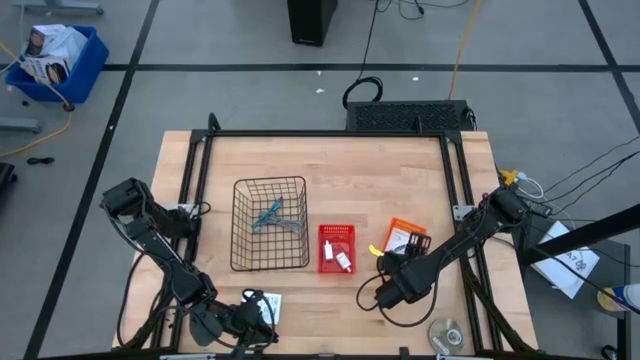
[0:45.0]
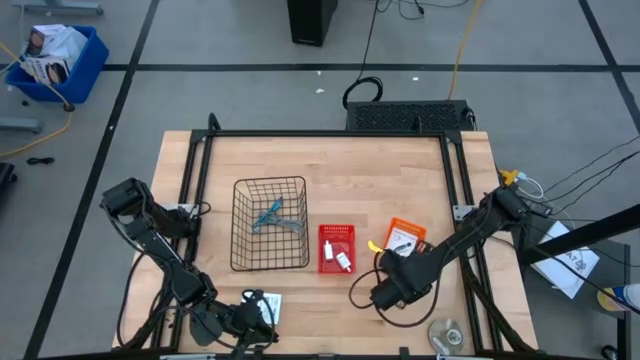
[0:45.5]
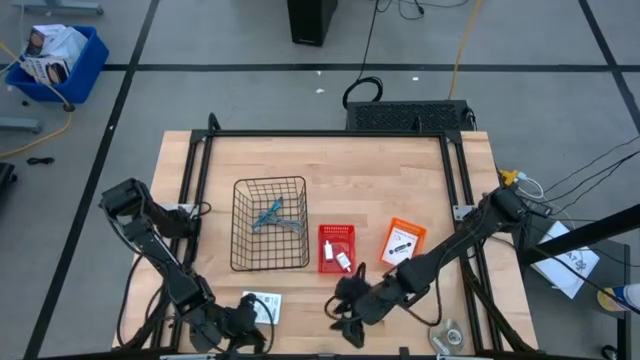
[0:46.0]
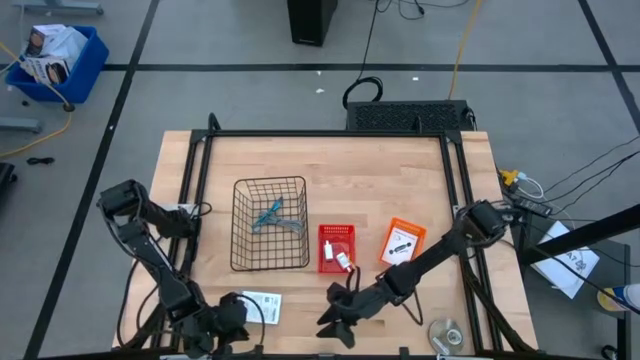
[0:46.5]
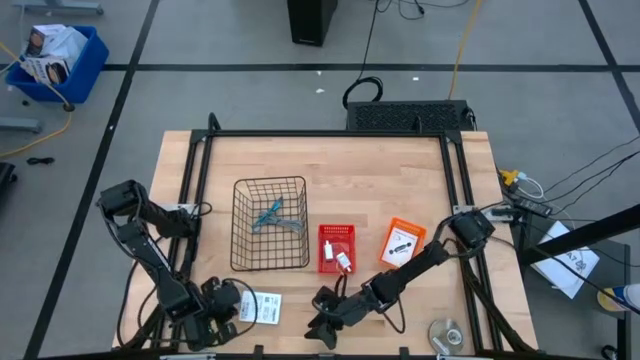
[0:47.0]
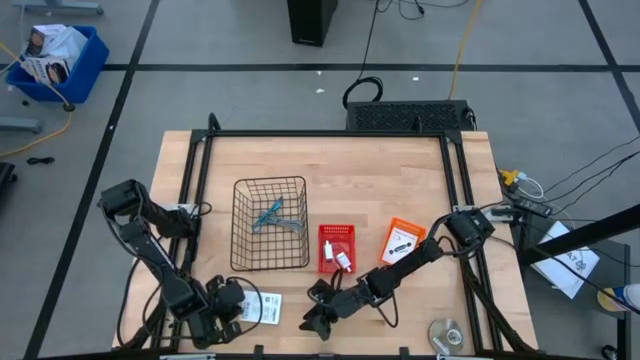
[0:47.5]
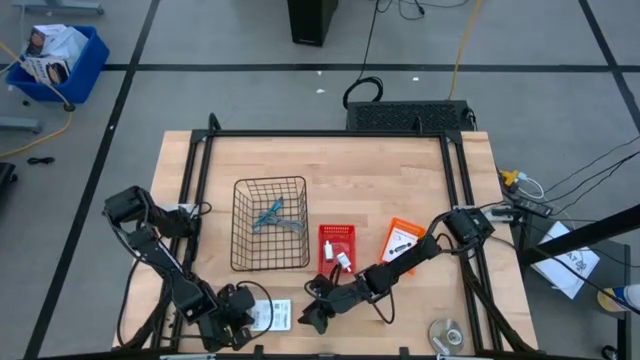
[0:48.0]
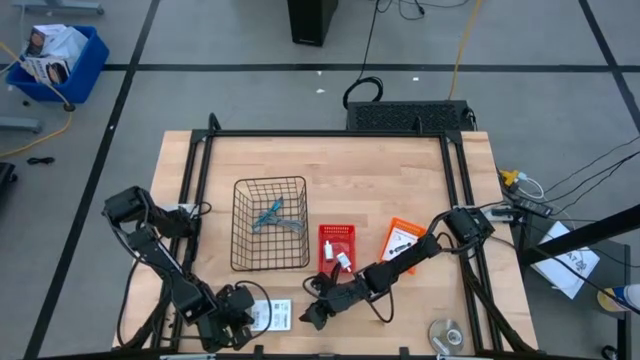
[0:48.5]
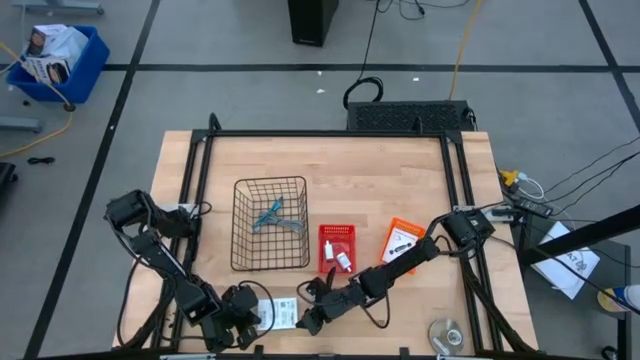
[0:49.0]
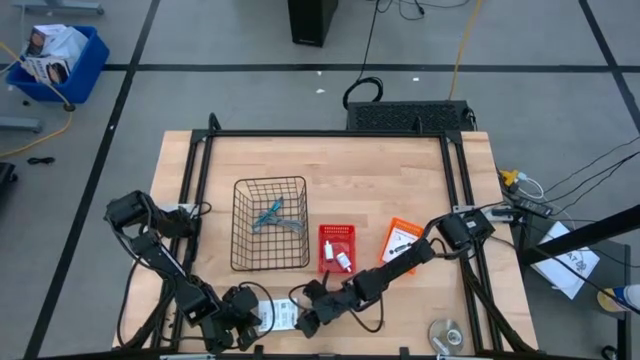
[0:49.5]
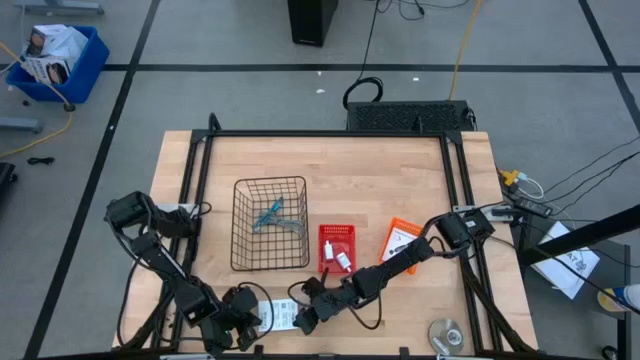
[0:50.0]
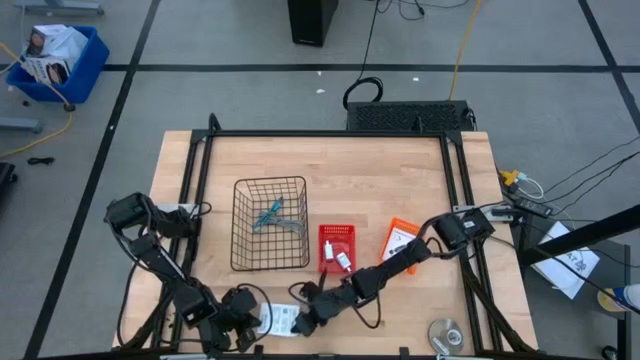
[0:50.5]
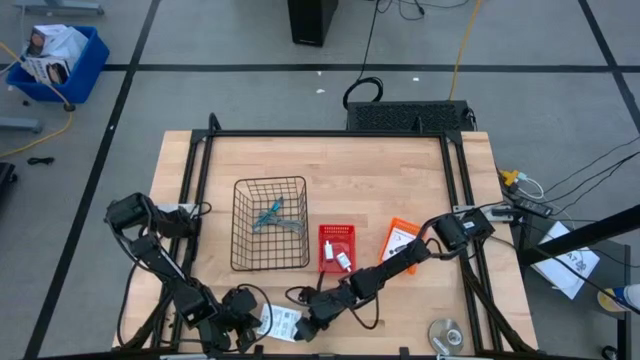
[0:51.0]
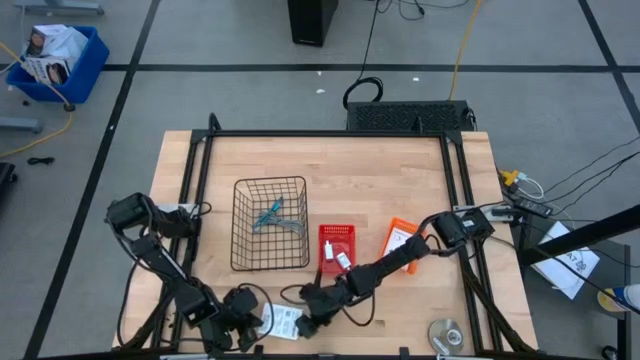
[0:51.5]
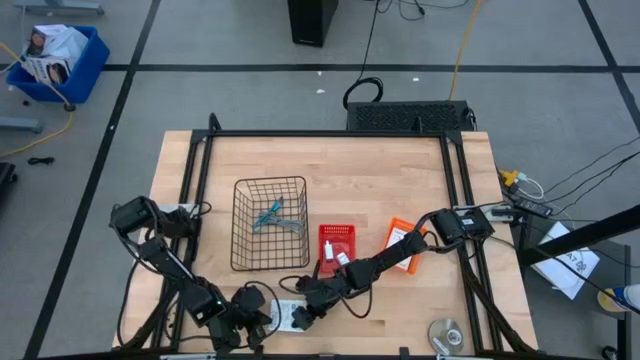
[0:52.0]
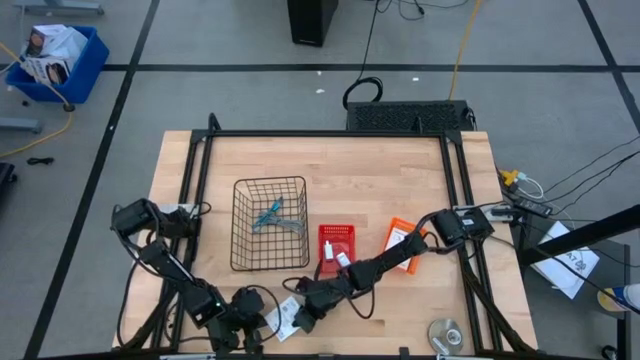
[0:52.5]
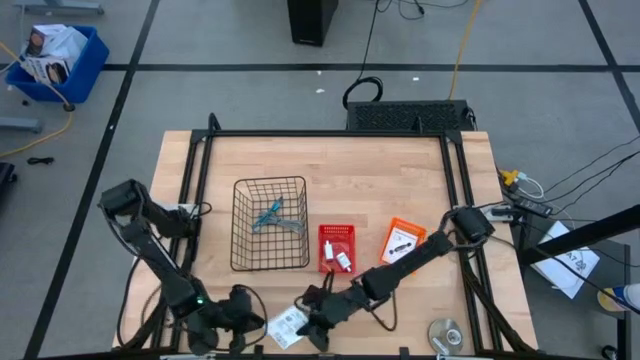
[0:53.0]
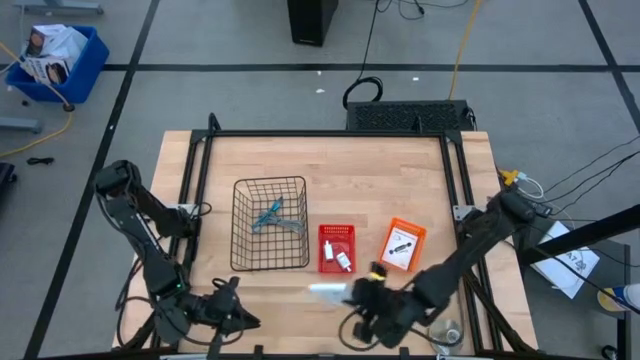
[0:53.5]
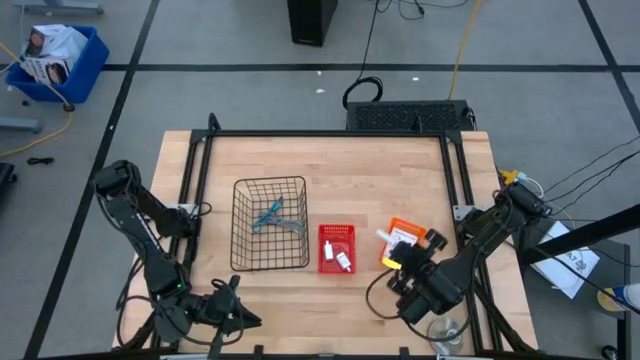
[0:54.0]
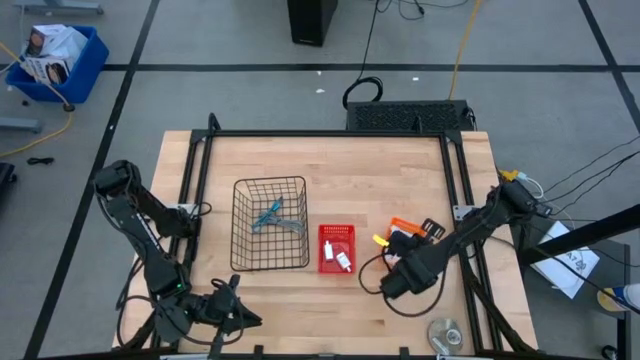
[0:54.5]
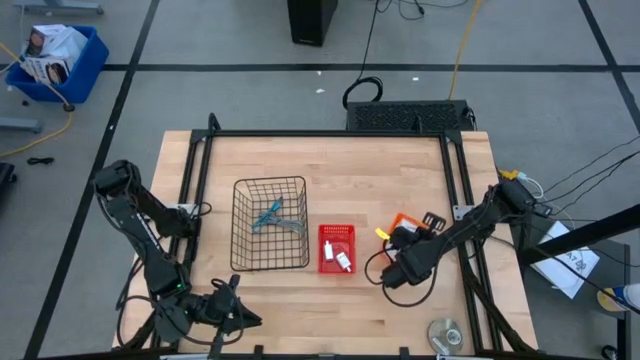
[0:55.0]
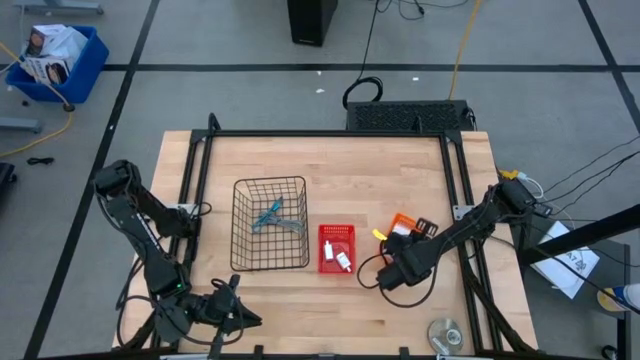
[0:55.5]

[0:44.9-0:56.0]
Task: Pick and place items into bin
Put the white card reader box into the orange bin

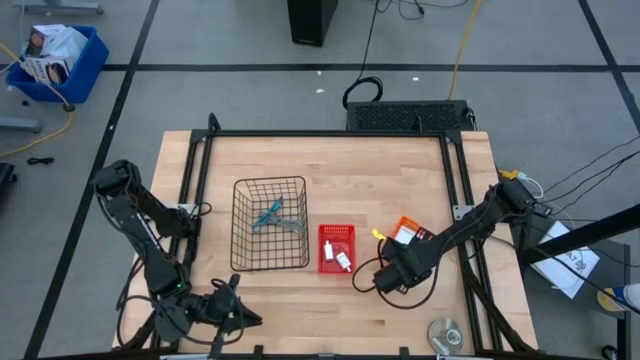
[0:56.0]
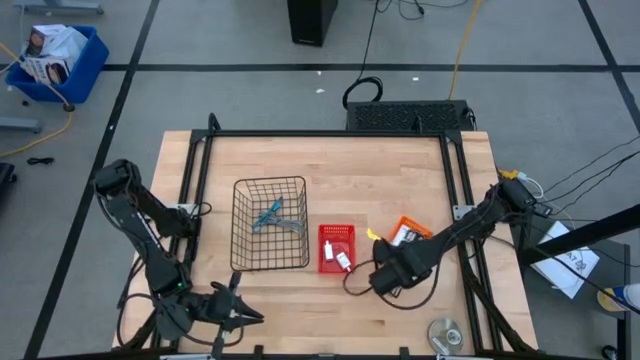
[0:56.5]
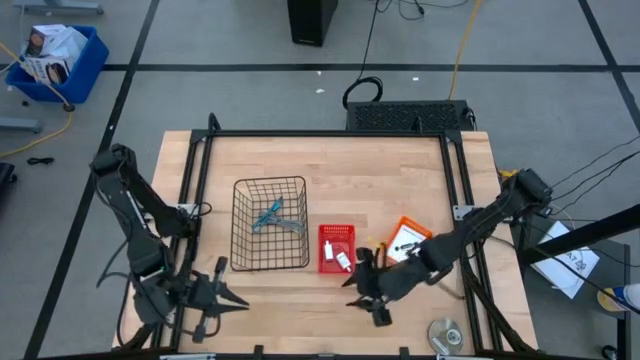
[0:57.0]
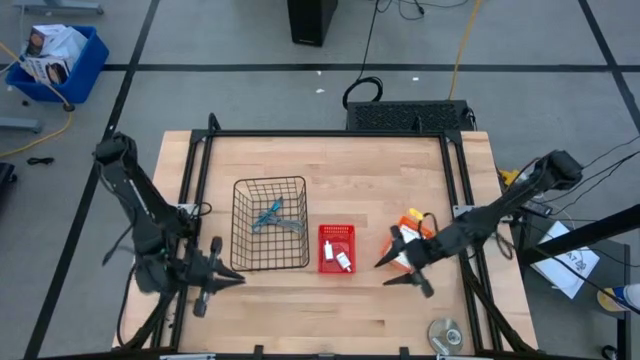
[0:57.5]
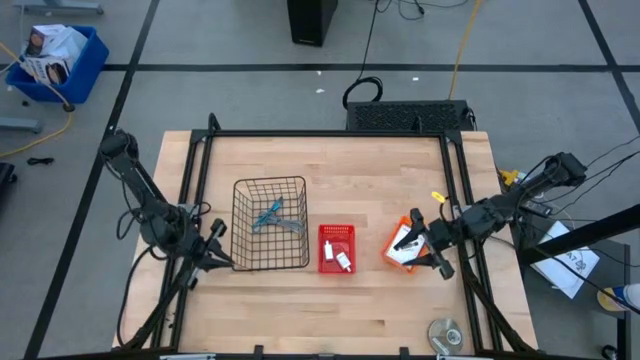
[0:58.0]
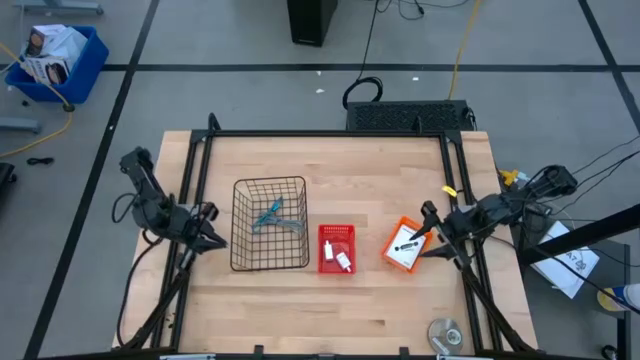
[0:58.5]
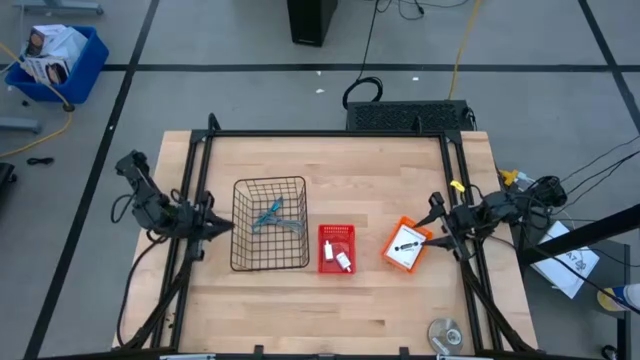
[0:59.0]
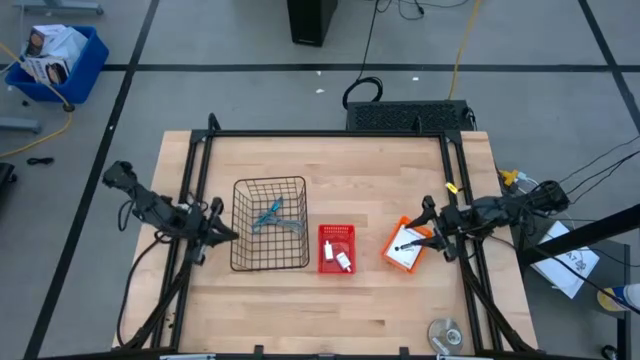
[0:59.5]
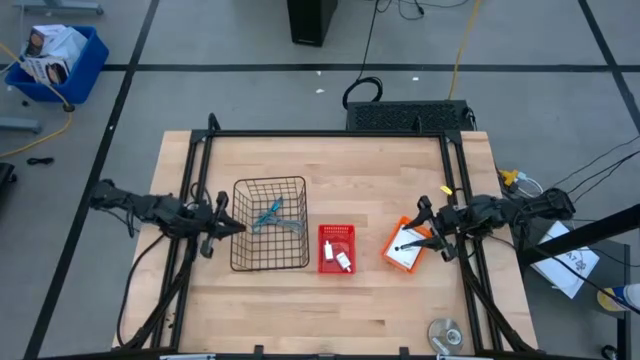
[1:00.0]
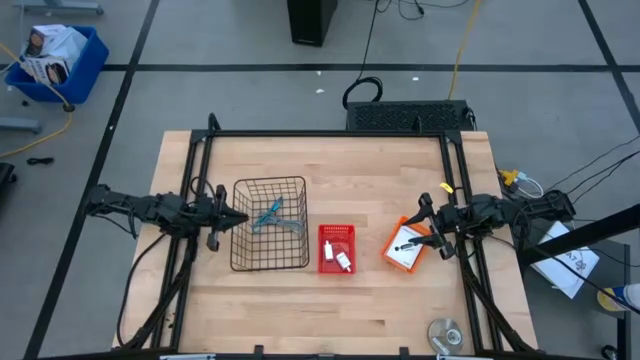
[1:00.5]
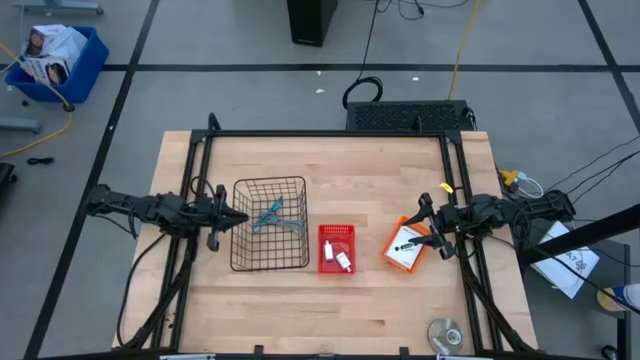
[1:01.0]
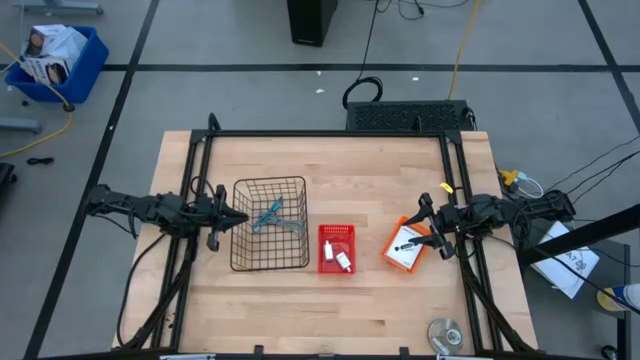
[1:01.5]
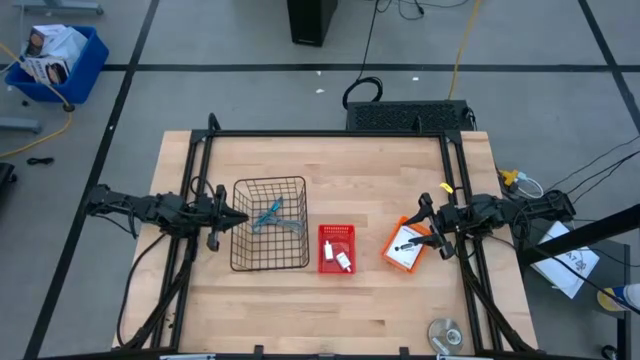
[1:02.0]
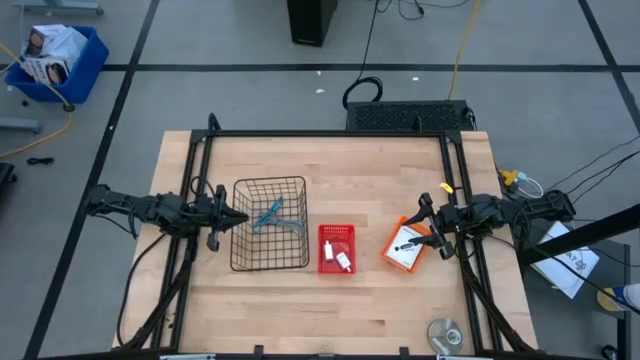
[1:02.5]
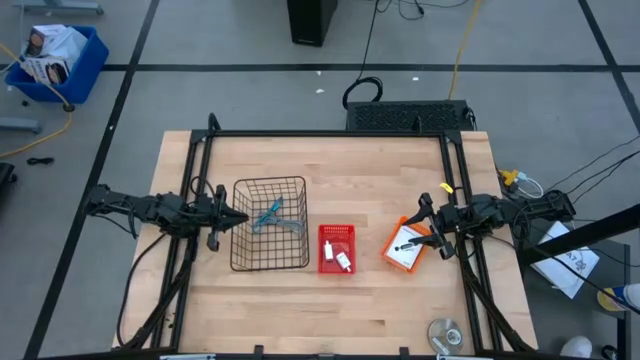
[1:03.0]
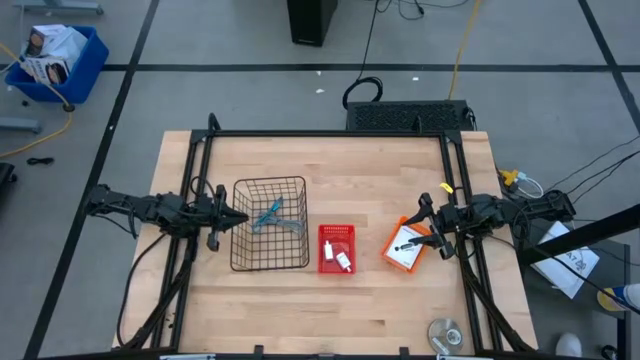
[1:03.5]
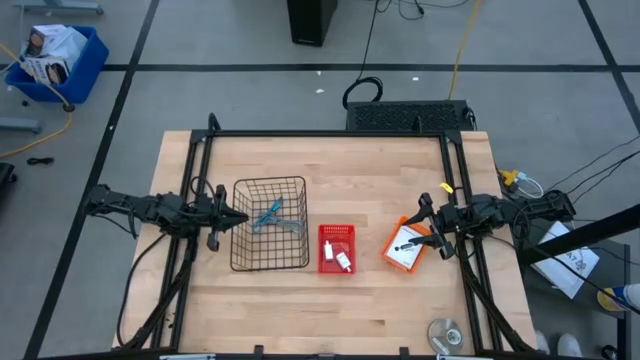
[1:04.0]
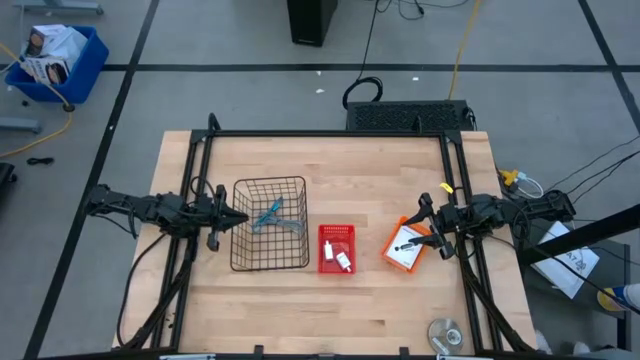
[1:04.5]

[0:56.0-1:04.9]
Return to Home Position

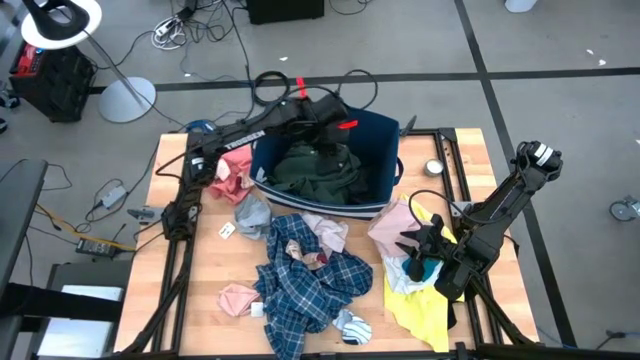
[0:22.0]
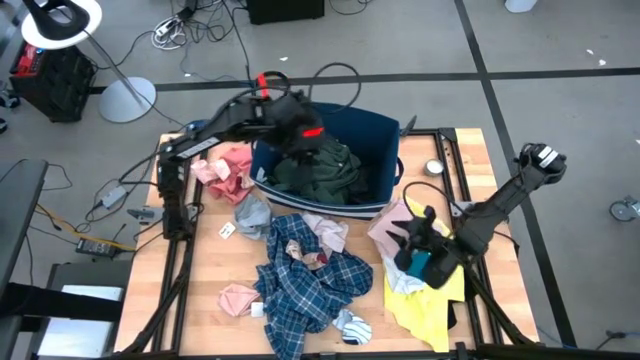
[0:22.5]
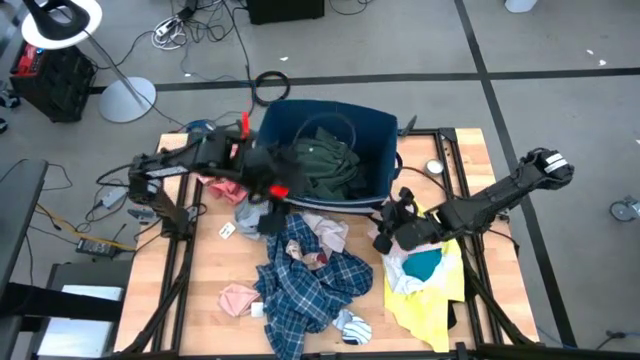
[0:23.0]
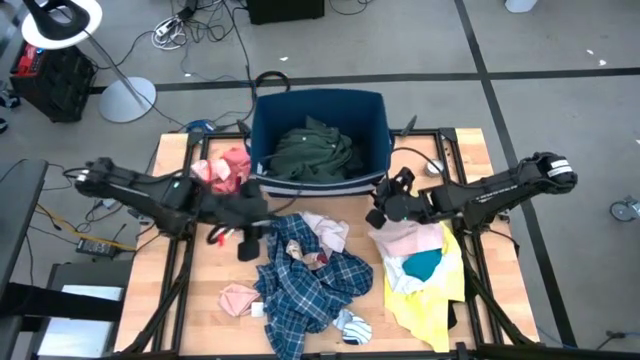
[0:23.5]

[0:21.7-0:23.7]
Task: Sort clothes
Adjust the blue bin
